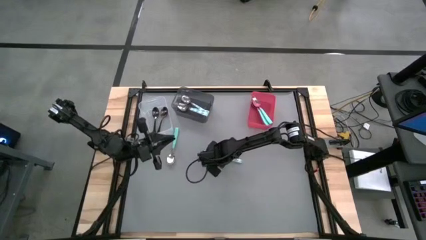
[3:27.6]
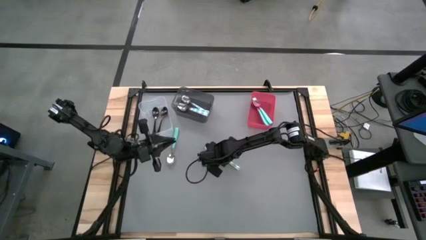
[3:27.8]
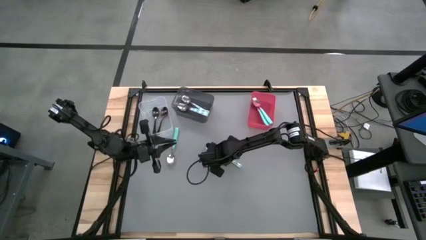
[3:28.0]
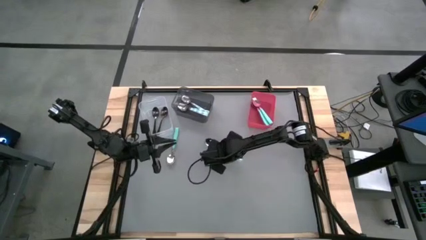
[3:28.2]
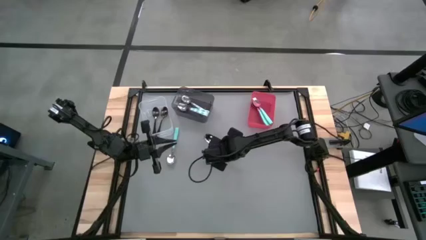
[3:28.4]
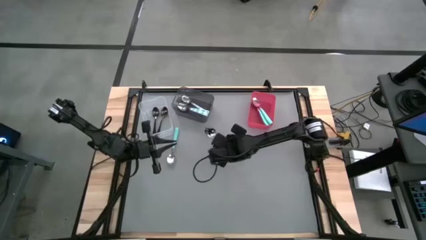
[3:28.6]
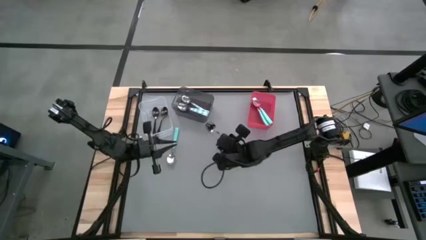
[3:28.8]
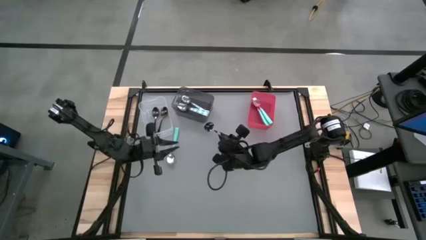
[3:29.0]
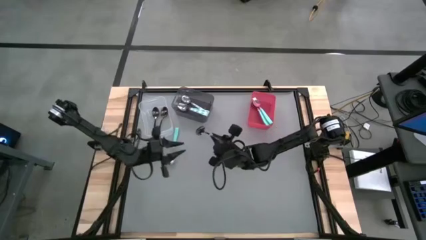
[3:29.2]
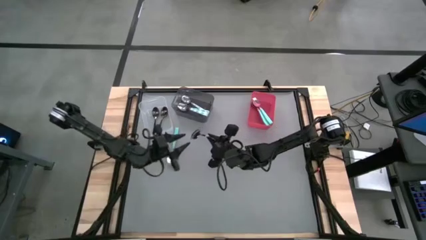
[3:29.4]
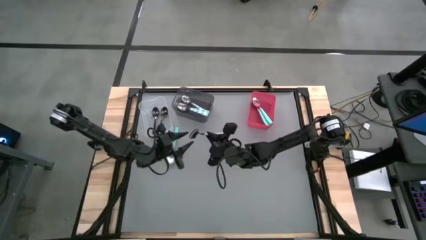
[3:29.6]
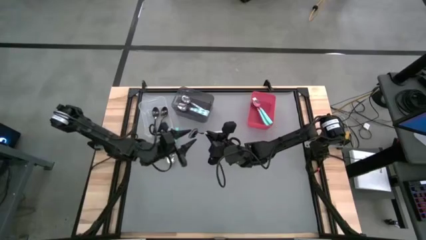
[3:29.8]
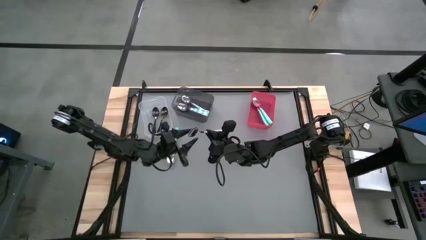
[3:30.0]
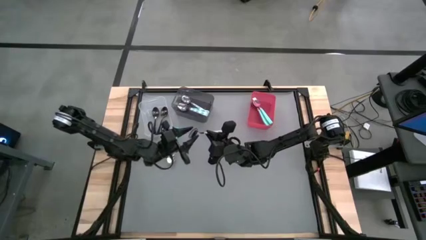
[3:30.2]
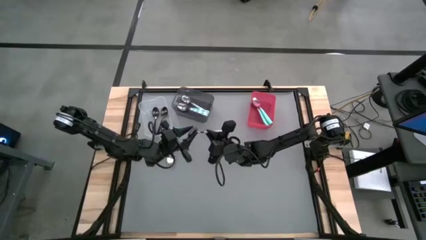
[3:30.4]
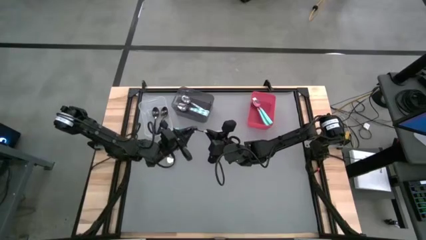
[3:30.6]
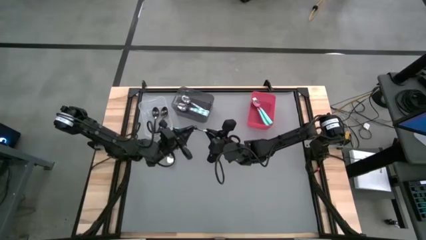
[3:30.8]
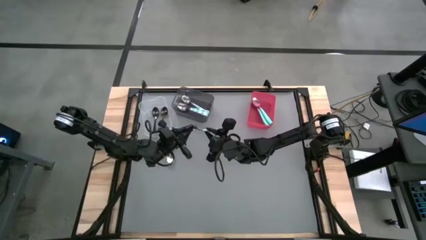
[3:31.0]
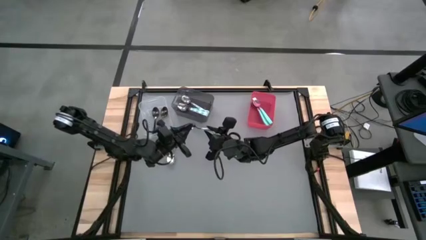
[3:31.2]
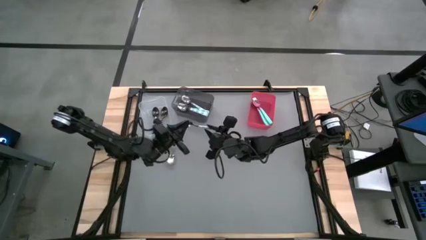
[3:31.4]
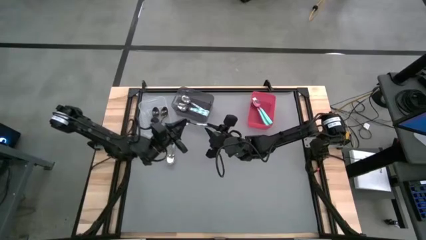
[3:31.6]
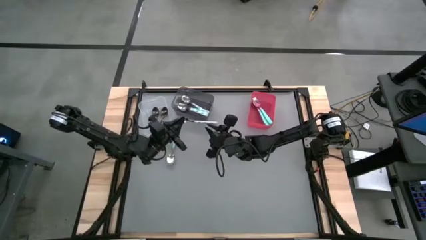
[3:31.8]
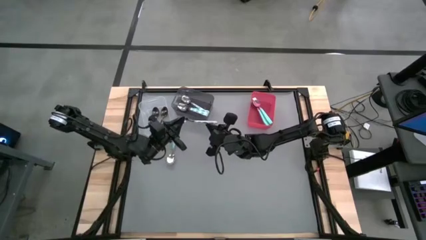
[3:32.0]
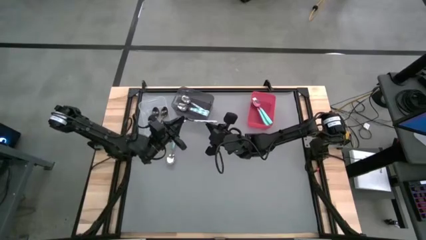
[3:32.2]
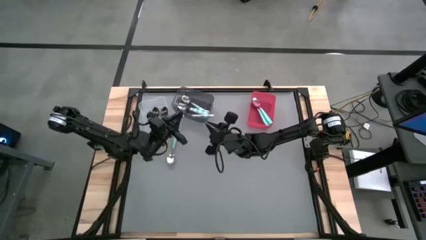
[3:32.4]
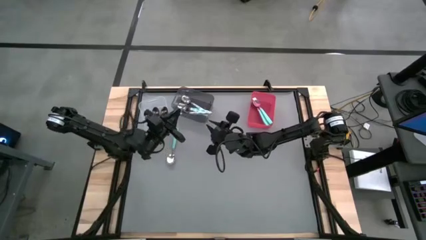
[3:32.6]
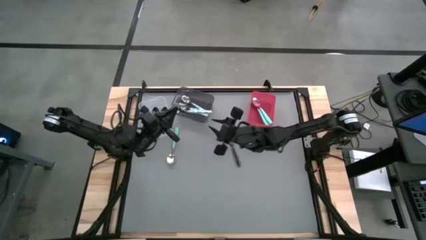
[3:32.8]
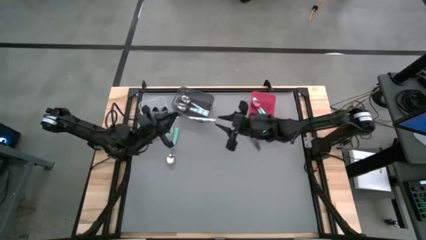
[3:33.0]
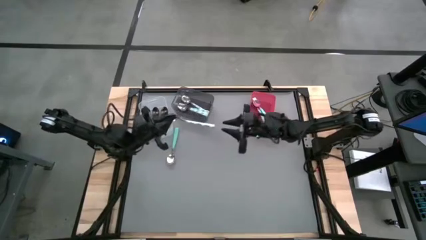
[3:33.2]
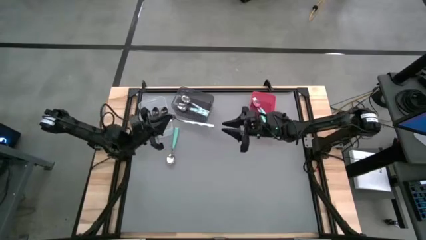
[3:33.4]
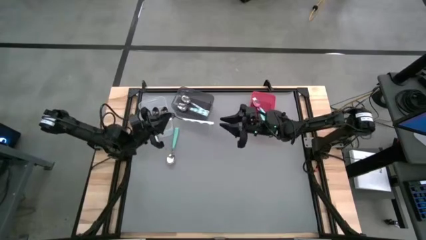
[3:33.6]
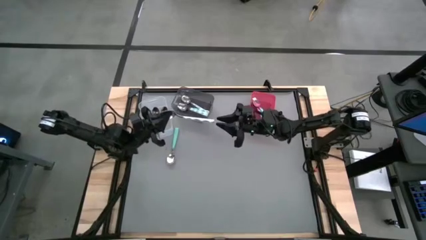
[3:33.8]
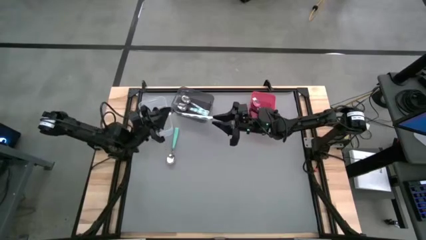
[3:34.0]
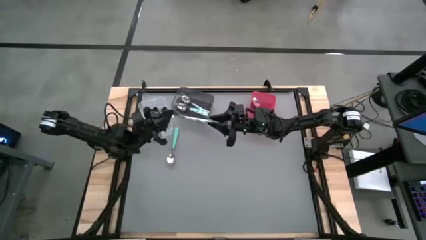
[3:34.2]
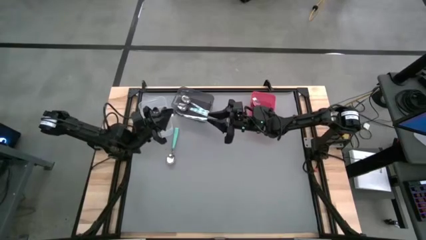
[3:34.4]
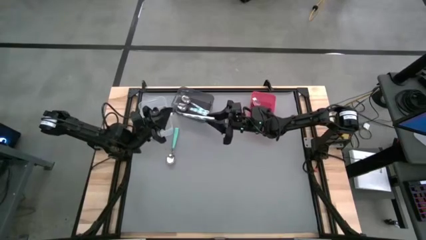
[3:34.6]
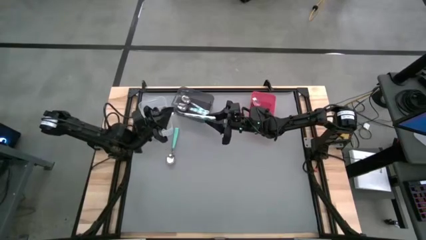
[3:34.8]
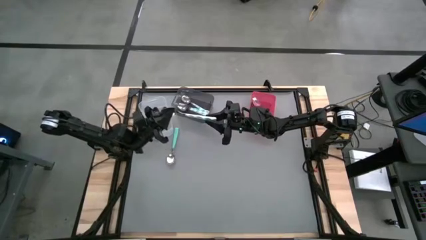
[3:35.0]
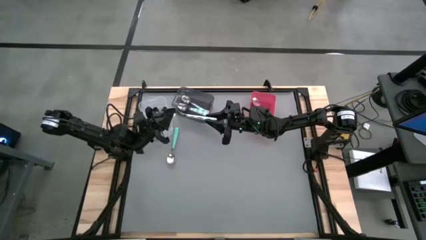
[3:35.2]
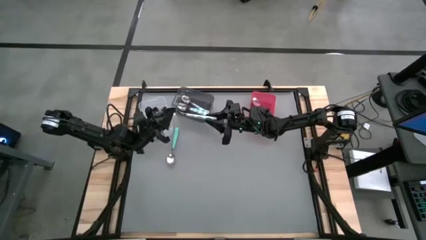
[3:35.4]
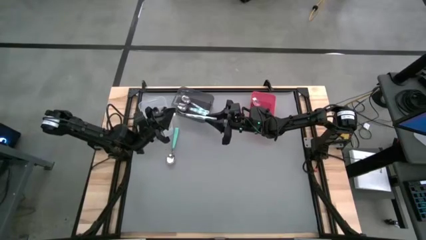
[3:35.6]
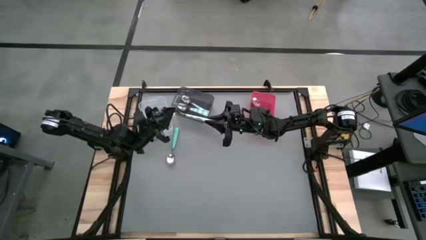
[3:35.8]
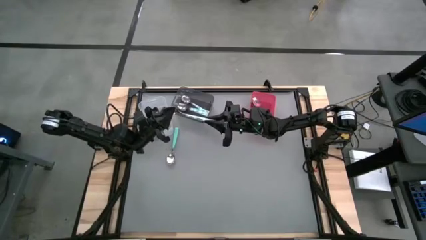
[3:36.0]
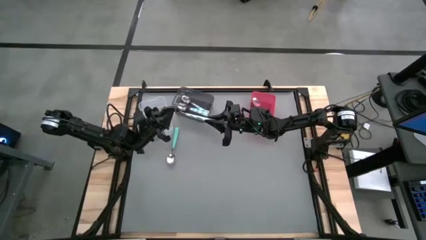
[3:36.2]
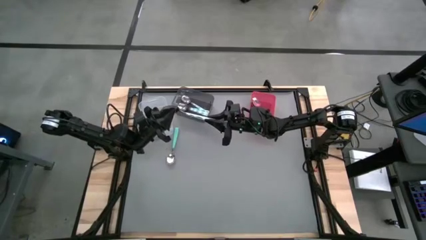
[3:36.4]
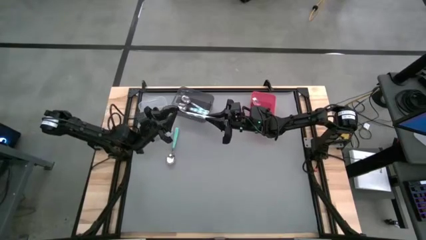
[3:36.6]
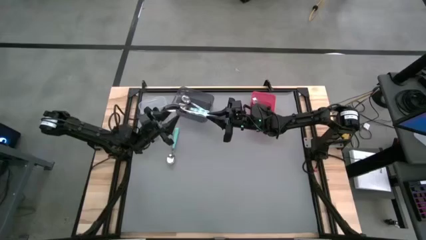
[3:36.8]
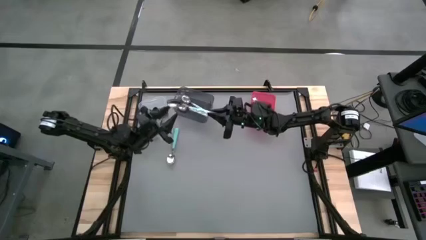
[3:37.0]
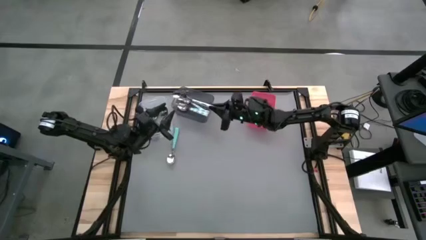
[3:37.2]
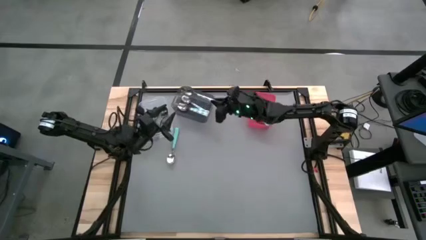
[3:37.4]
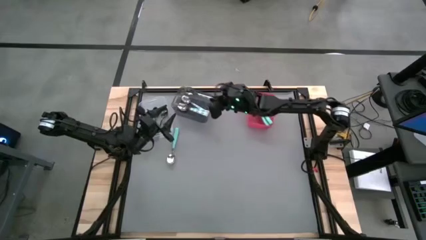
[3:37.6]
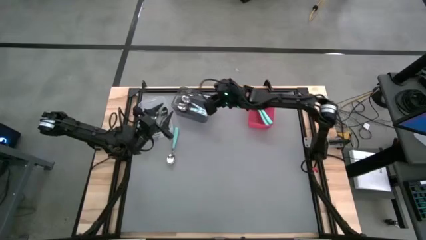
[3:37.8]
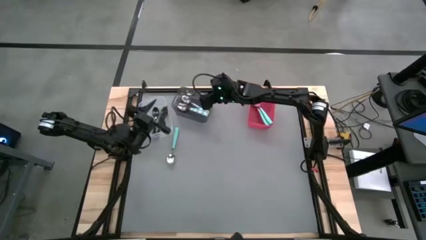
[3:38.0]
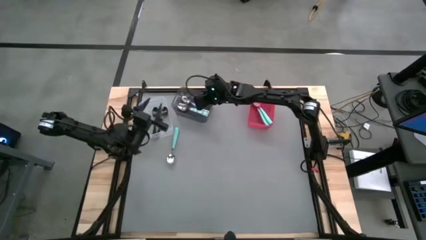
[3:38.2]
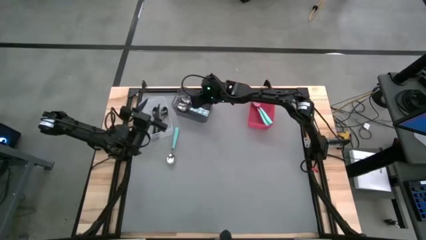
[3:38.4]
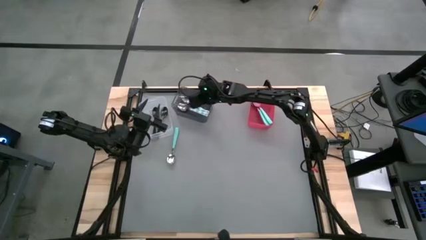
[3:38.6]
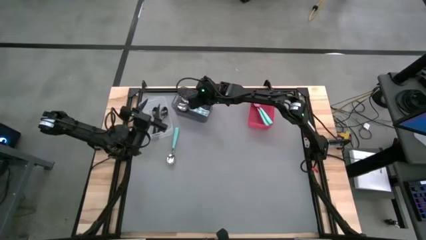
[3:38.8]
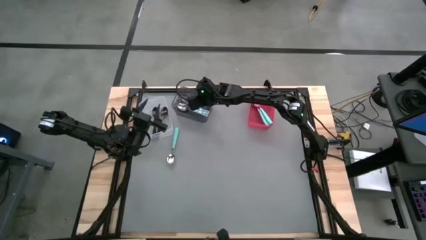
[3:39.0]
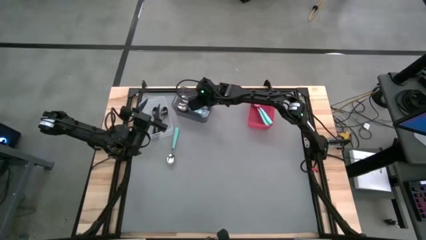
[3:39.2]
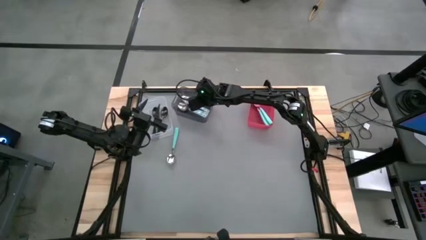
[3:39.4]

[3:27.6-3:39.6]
Task: Sort silverware by color (type)
Put the blue patterned spoon into the black bin

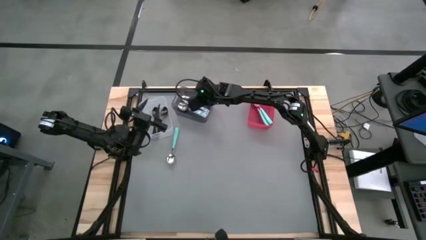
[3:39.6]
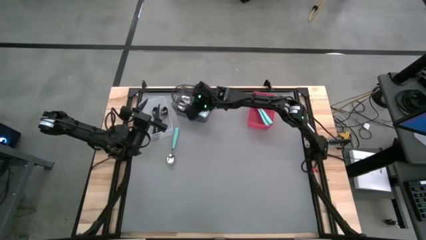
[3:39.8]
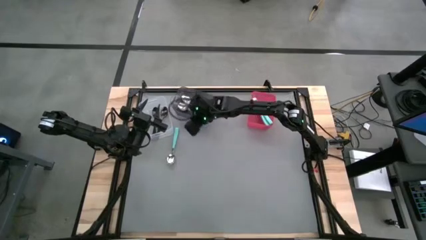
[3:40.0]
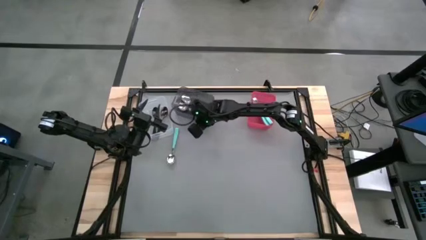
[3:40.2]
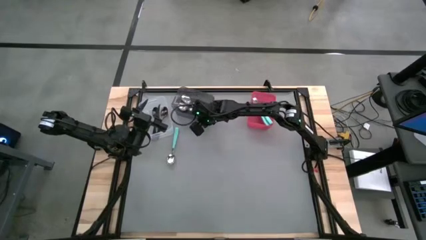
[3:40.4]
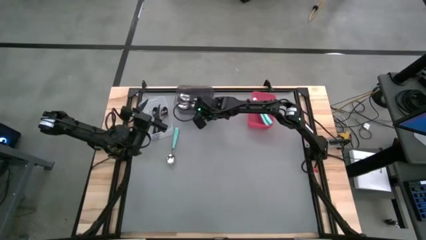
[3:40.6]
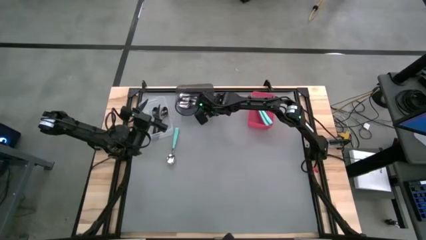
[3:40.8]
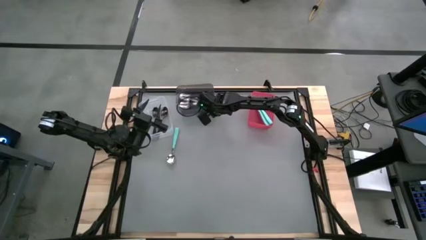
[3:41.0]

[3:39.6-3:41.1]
Adjust the black bin

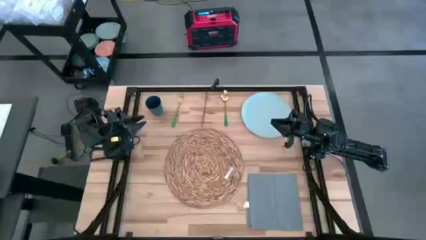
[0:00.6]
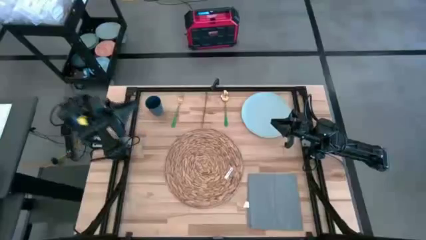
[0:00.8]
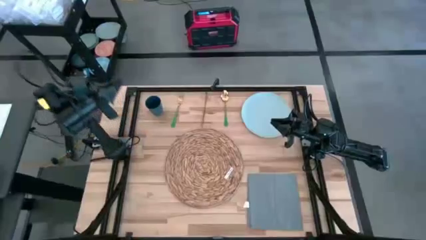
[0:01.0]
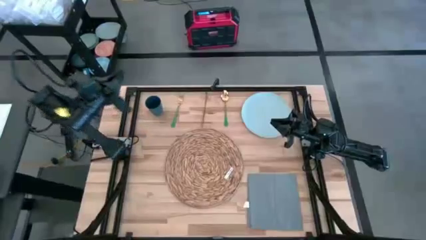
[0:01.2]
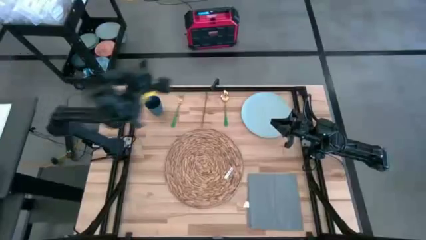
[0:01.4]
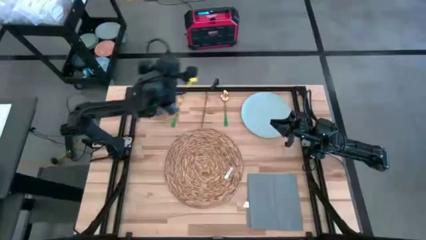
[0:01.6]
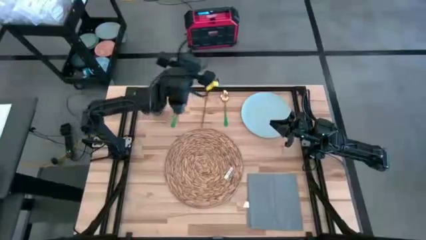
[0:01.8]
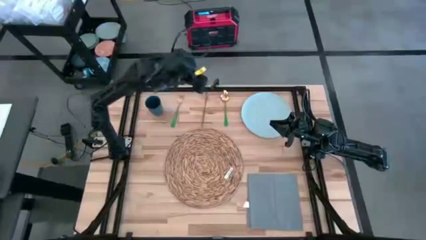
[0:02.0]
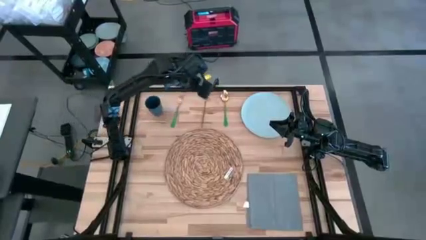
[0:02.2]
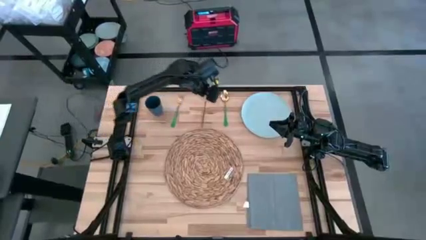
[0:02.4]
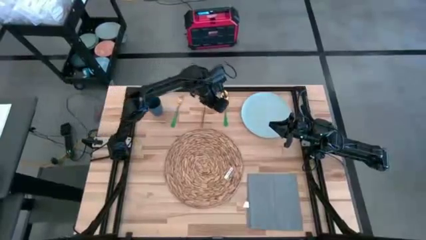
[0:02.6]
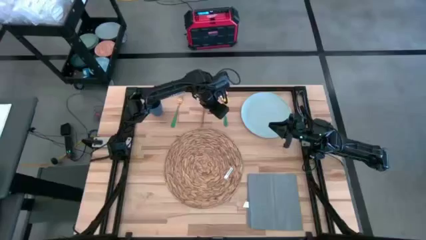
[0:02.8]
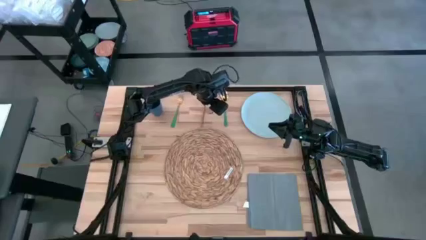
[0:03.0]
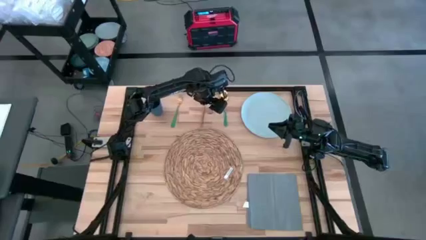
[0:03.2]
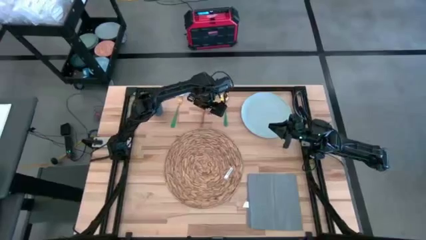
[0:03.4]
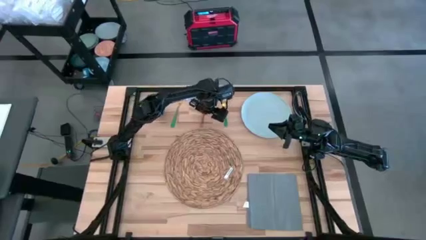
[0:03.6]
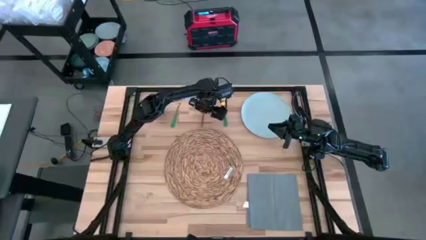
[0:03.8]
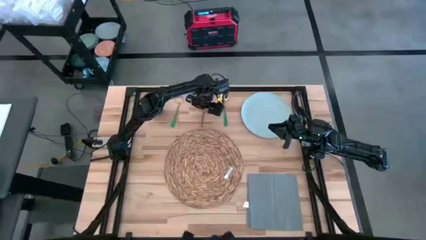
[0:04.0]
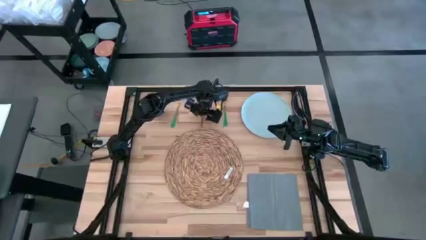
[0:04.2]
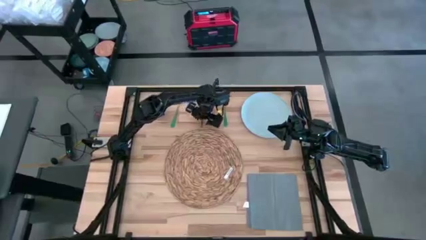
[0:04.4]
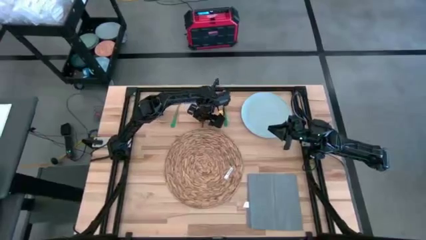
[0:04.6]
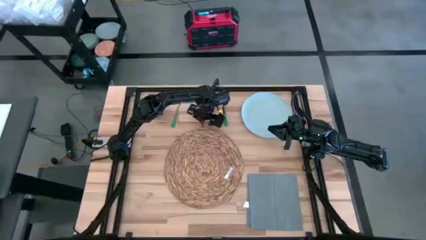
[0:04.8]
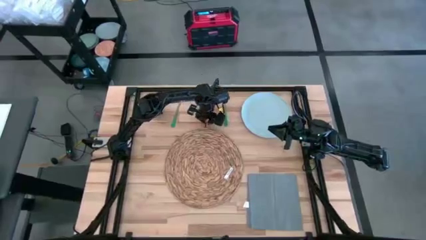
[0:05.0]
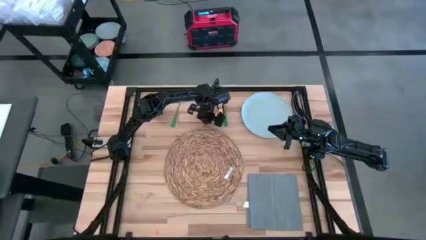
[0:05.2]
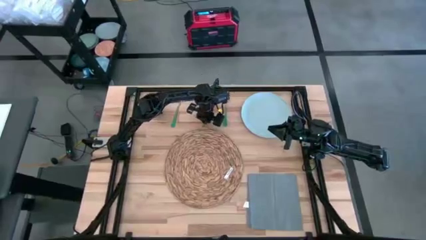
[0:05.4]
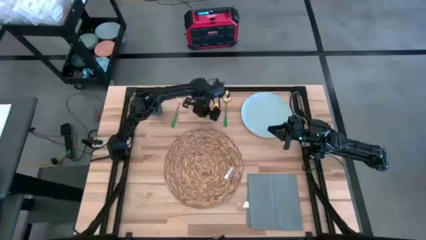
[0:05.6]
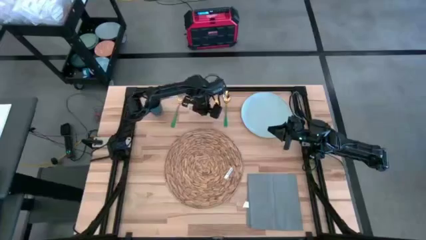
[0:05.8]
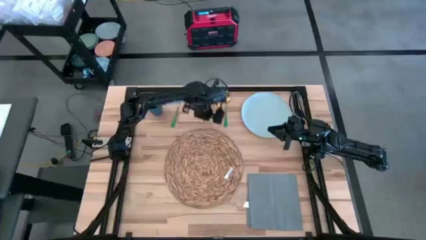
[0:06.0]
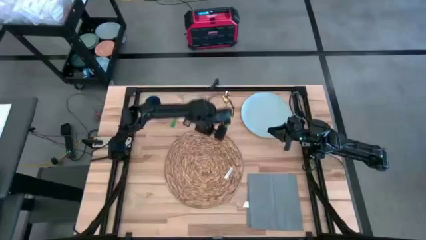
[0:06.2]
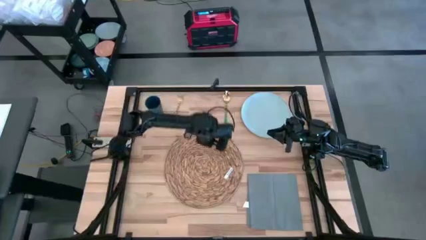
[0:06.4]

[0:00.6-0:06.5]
Task: Set table place
Put the gold table knife on the brown placemat
